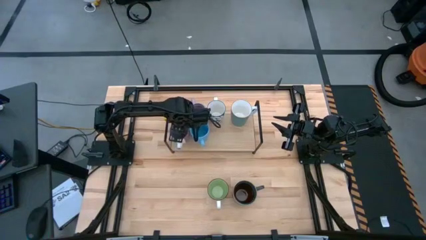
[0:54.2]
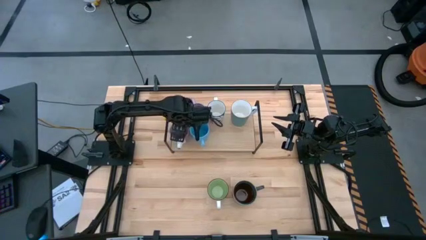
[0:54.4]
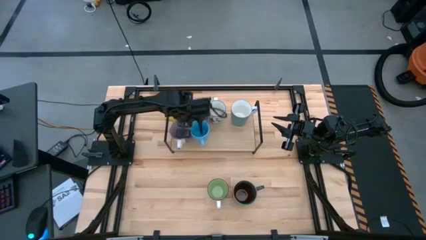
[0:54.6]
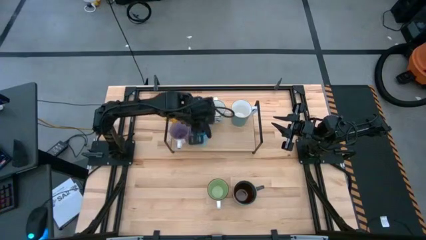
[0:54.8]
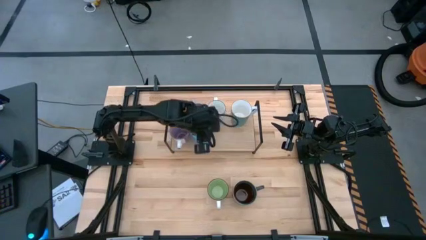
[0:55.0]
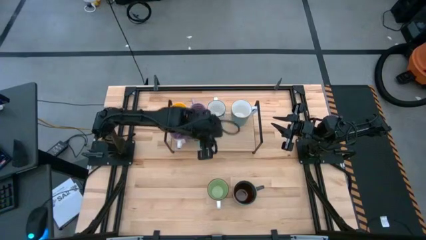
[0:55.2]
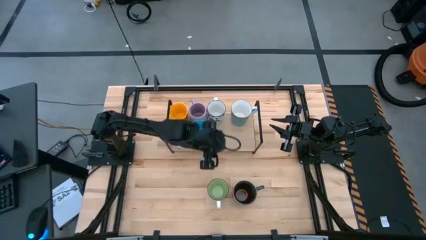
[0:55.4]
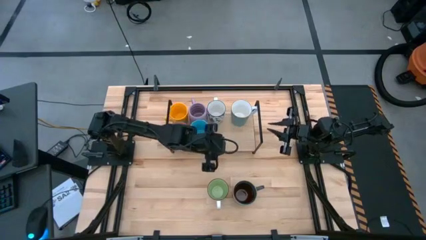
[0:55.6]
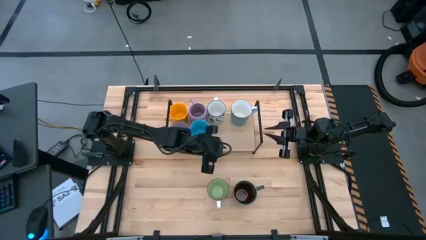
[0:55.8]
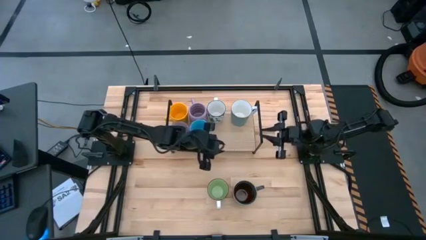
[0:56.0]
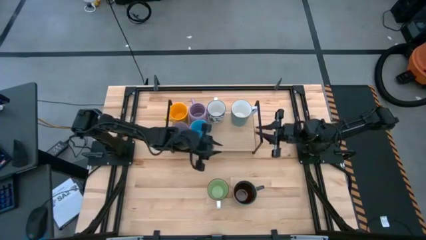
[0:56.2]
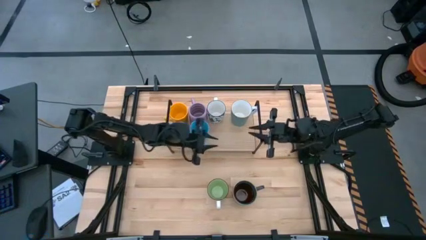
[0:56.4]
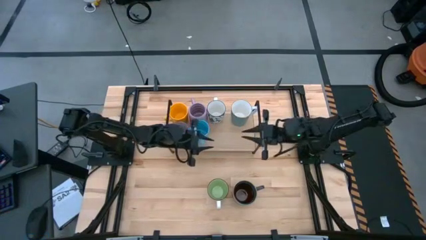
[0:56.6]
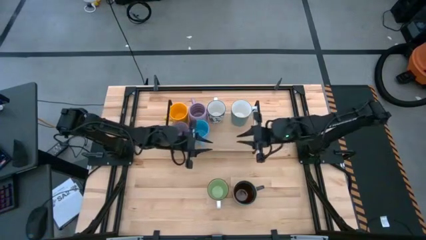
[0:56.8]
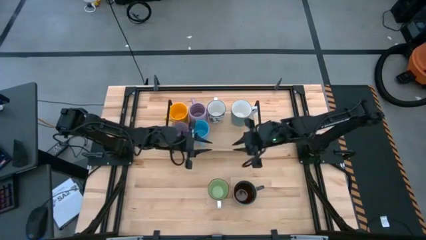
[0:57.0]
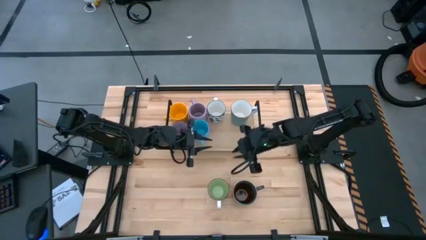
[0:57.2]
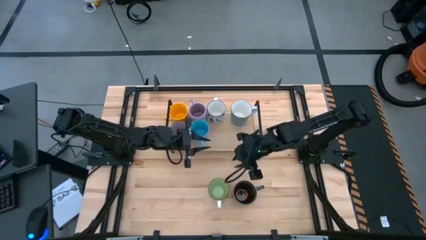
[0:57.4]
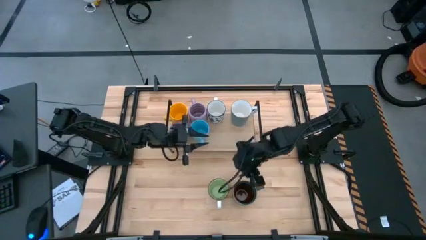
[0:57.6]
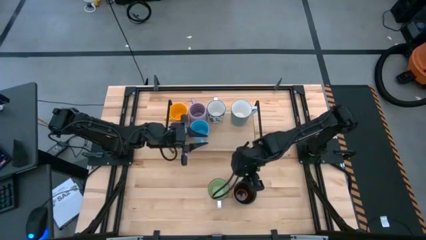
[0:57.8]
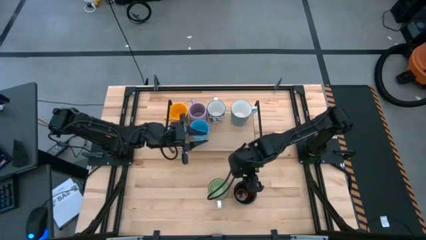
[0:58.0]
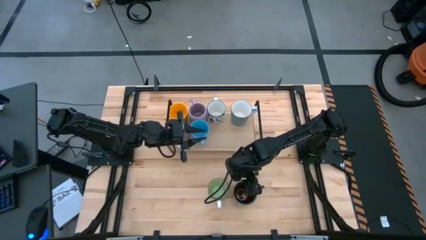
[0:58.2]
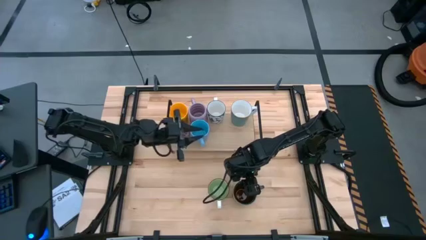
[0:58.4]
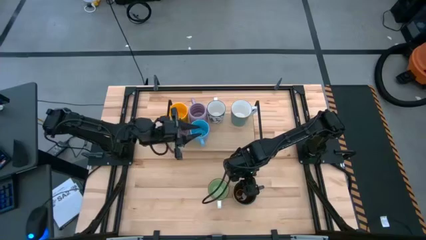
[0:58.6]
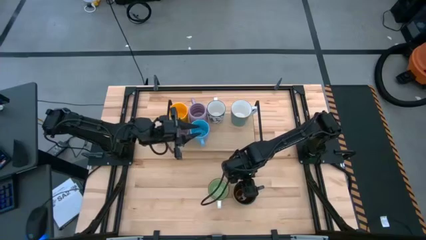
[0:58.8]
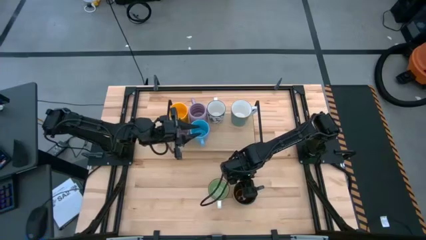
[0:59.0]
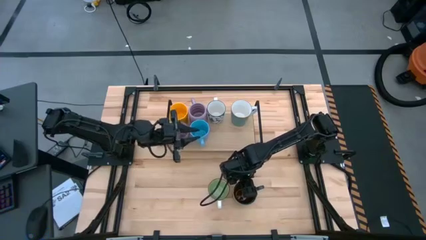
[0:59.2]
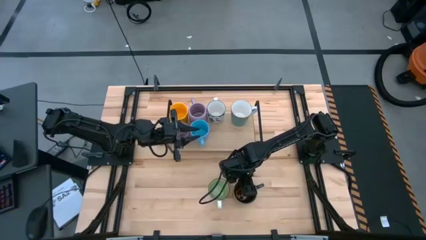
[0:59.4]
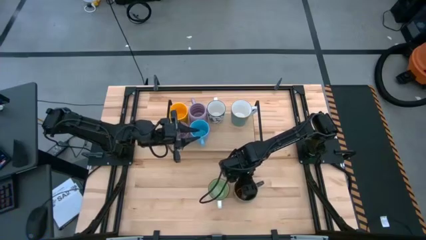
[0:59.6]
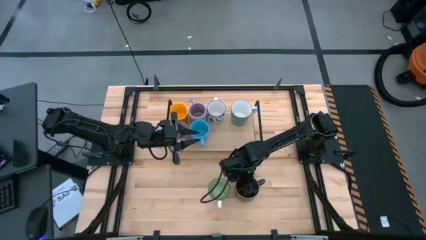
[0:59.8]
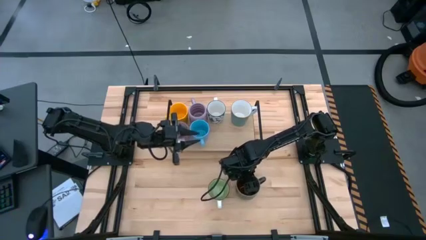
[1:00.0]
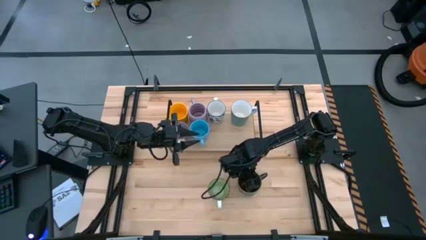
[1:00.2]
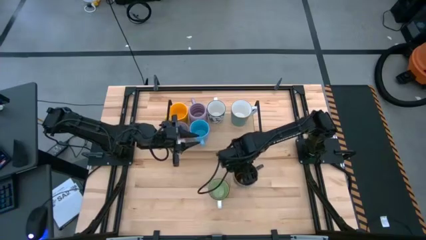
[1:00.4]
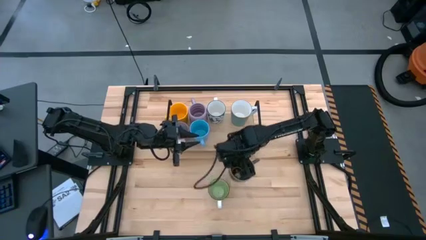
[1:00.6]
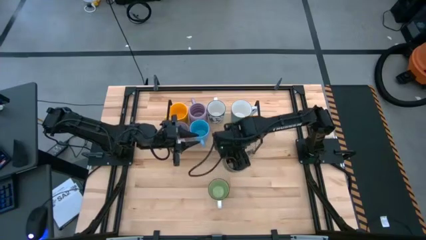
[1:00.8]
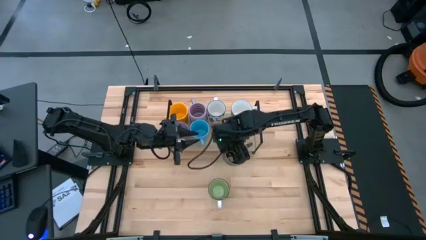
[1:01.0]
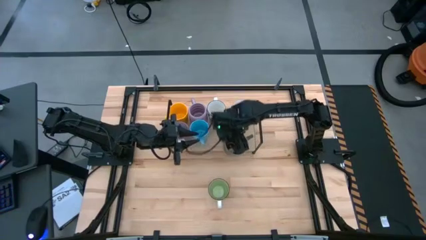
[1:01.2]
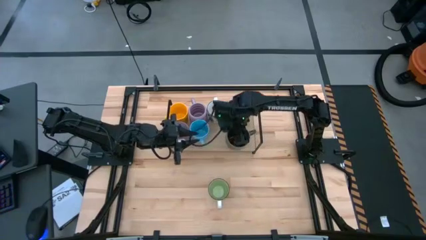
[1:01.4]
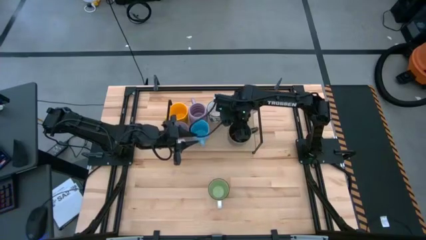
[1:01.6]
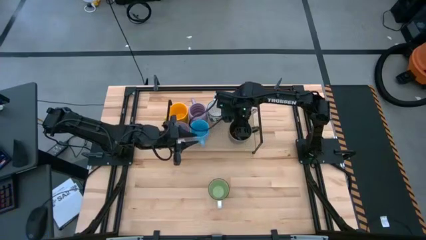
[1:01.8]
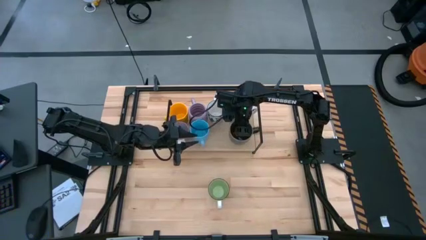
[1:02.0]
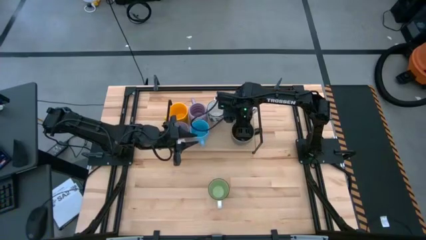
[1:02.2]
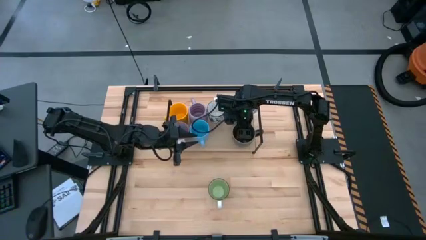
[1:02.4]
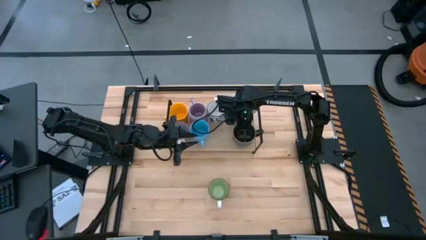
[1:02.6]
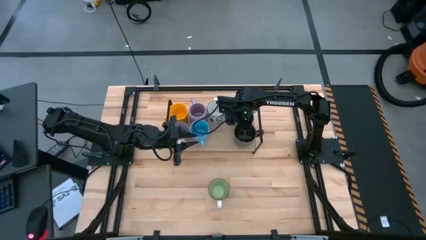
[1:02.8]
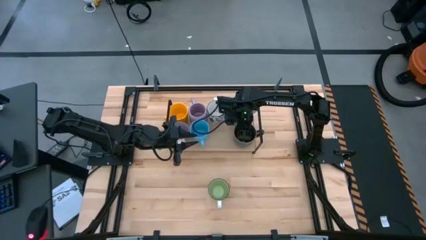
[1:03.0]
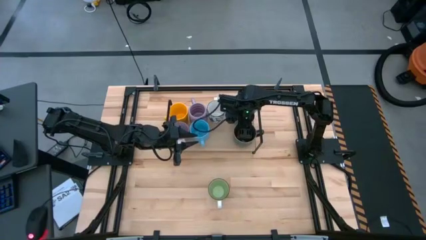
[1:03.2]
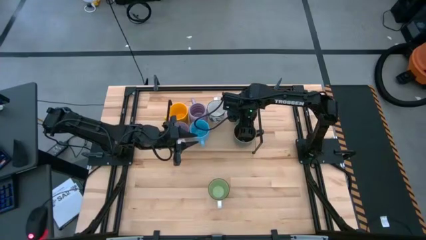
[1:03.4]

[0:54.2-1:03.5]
Task: Place coffee mugs
Put the dark blue mug on the shelf

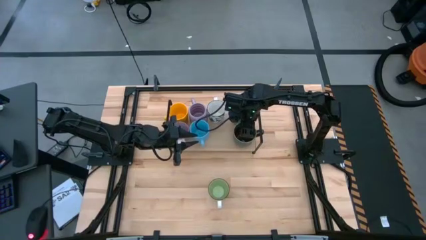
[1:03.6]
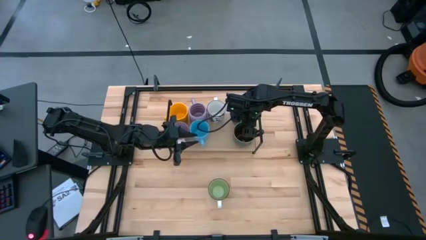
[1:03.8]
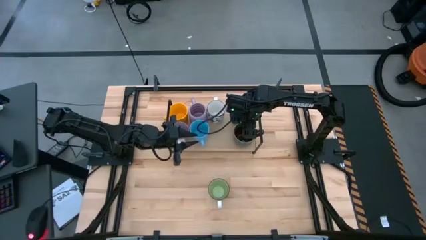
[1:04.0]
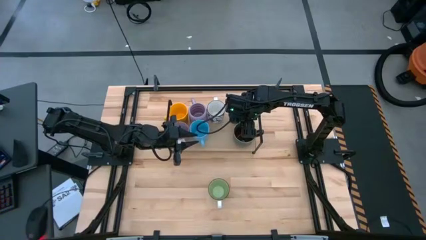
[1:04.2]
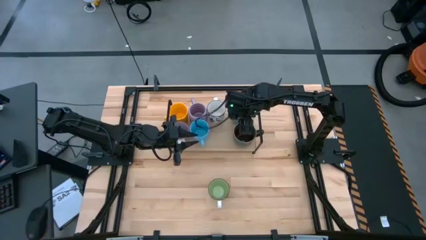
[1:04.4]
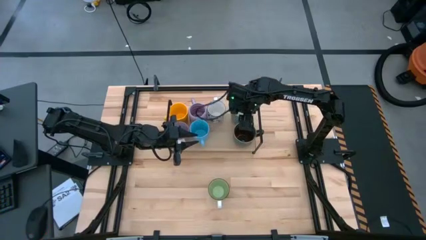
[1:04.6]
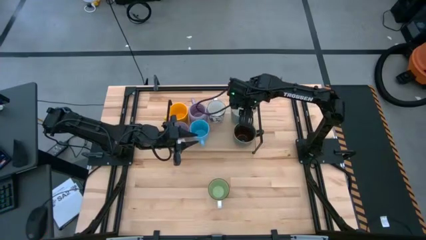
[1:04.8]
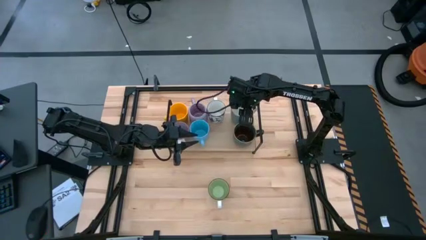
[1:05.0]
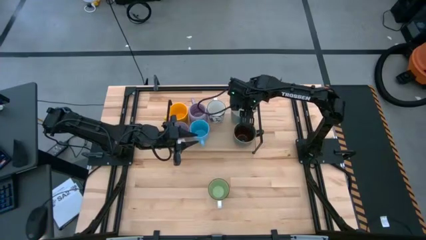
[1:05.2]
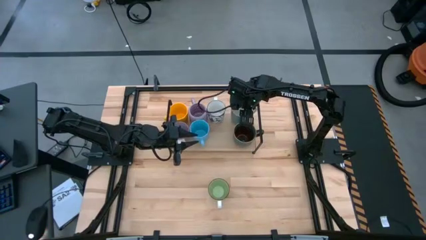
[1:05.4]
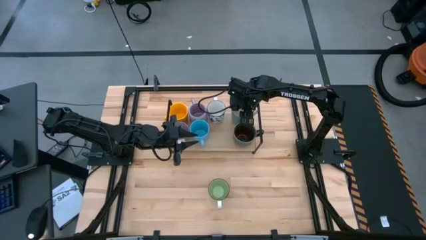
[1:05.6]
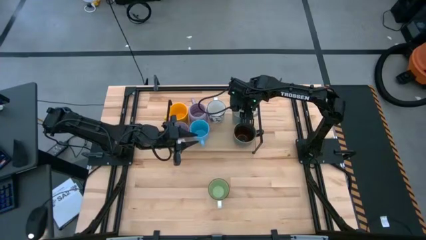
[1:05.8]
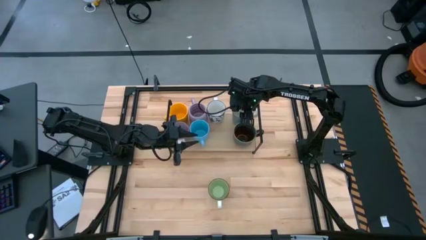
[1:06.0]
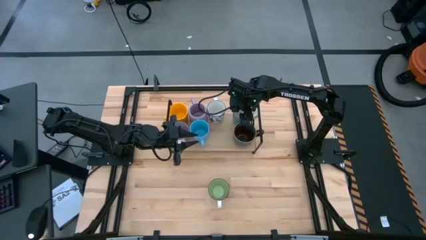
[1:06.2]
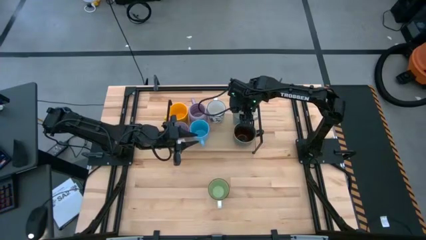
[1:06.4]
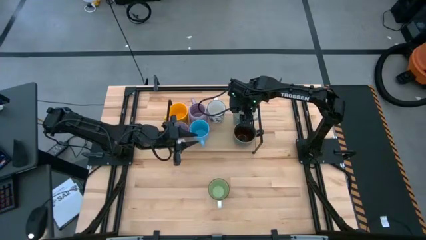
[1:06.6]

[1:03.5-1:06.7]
Adjust the light blue mug on the shelf

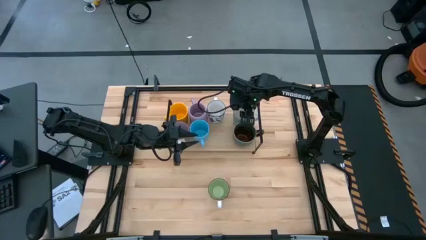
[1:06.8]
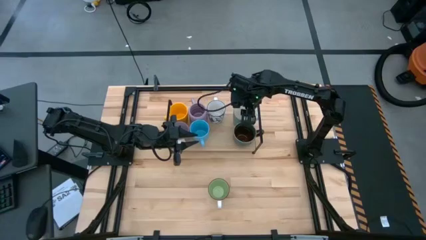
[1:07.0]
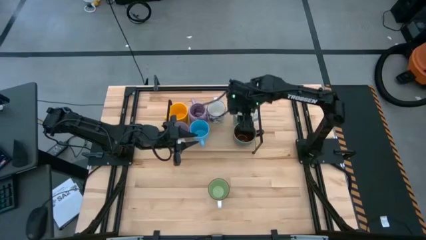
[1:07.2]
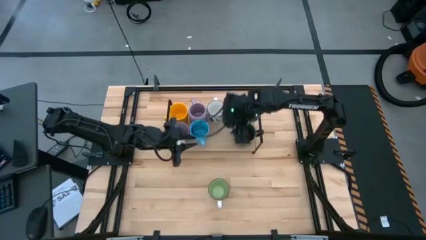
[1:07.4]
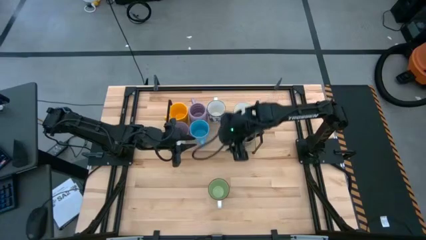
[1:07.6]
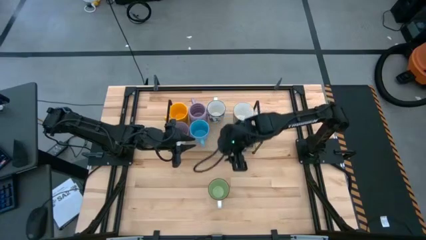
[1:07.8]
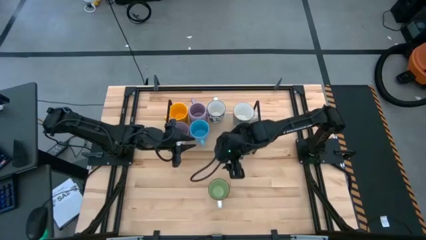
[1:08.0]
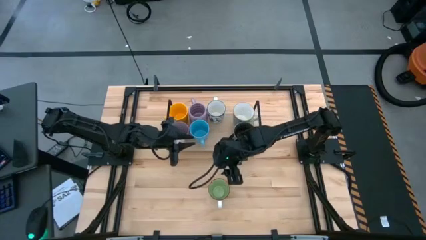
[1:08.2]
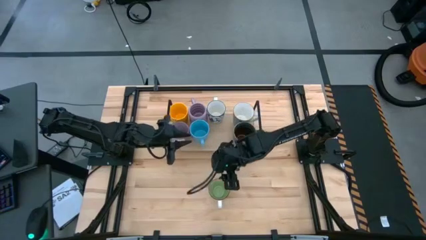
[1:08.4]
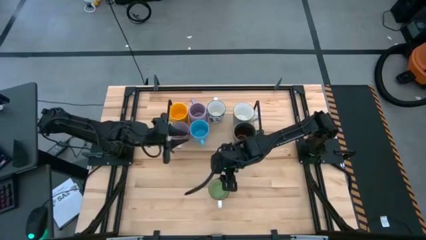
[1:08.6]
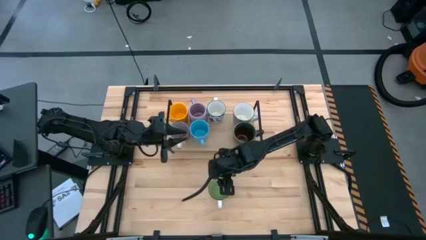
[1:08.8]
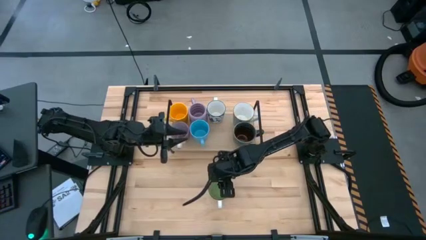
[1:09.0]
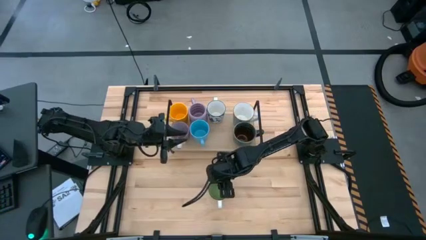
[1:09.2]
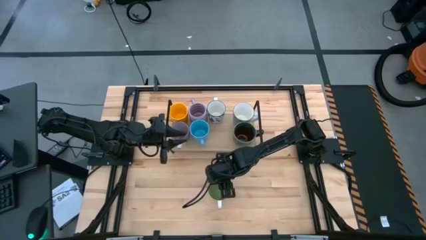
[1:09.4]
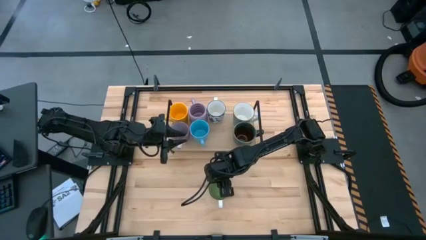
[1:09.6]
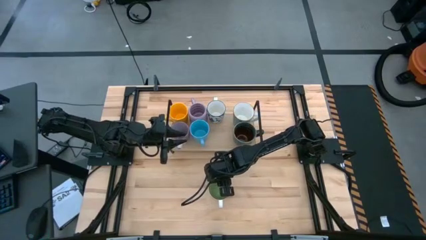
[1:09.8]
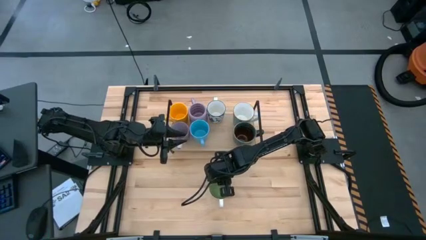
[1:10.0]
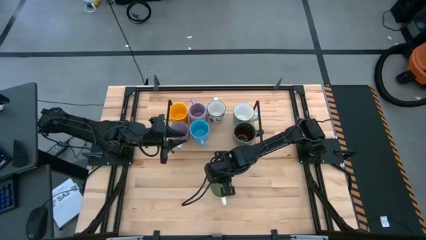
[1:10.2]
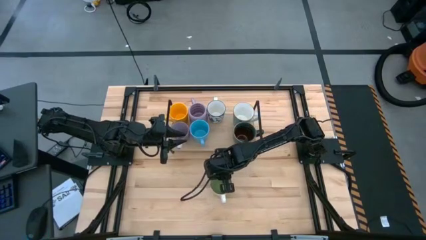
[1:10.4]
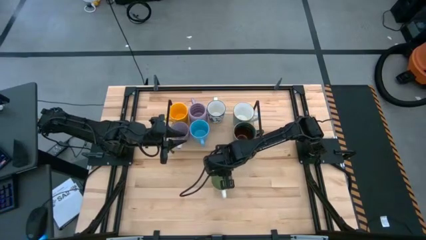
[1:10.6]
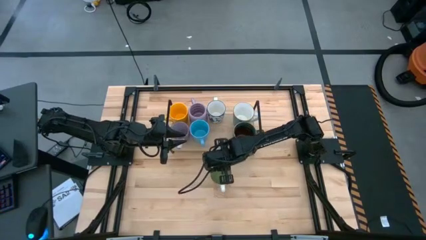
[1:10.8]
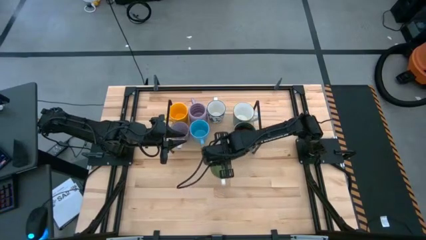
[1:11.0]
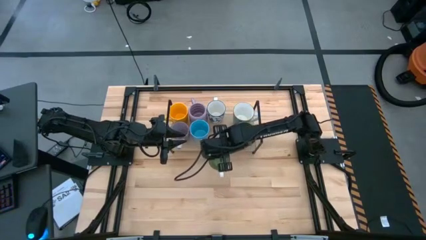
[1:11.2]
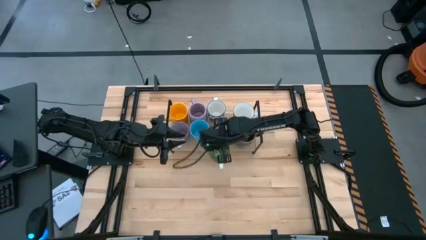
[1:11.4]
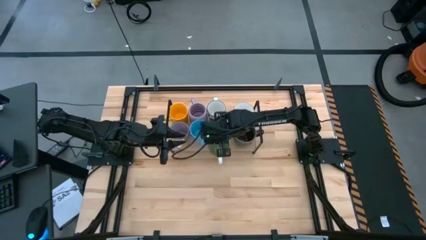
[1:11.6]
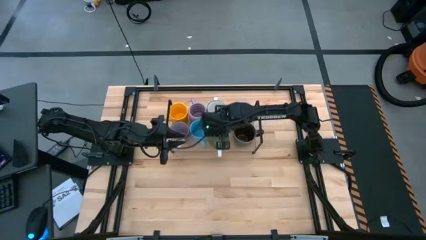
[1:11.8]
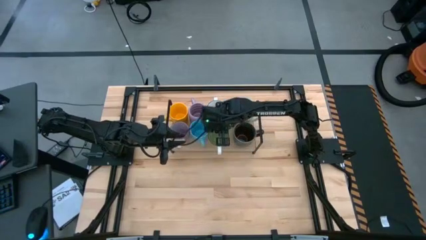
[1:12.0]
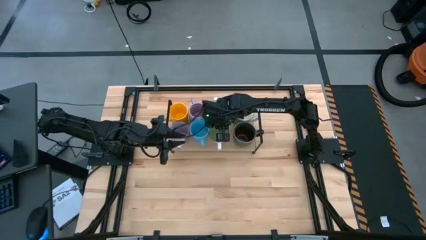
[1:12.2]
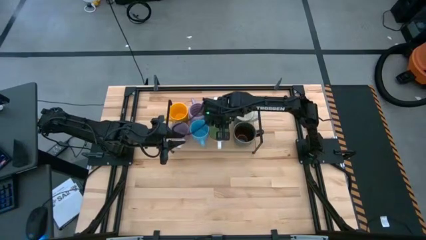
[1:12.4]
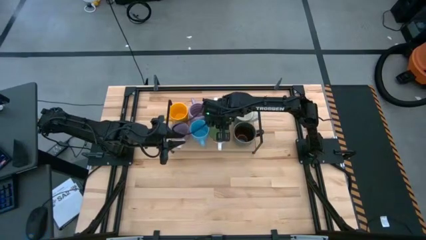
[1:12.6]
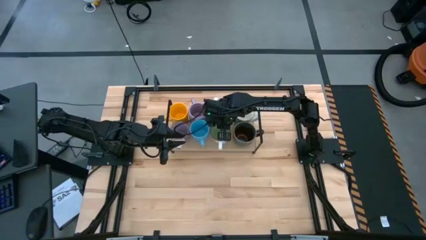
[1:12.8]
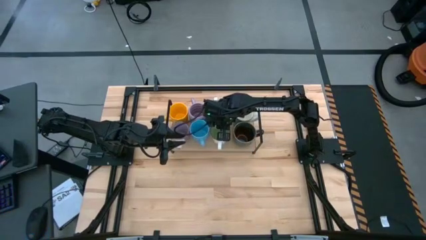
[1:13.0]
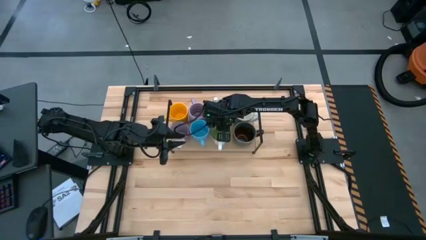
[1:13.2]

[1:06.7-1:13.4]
Put the green mug on the shelf
